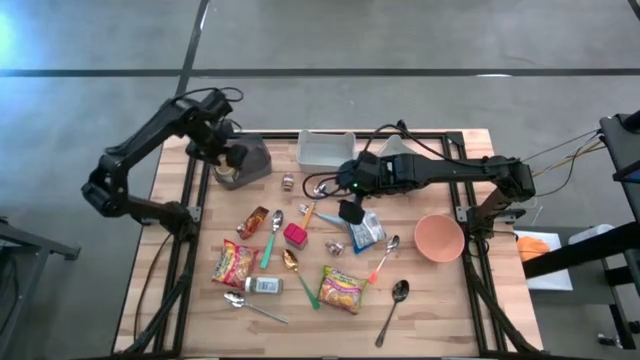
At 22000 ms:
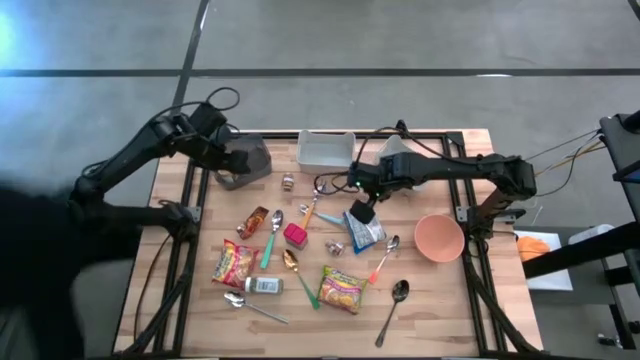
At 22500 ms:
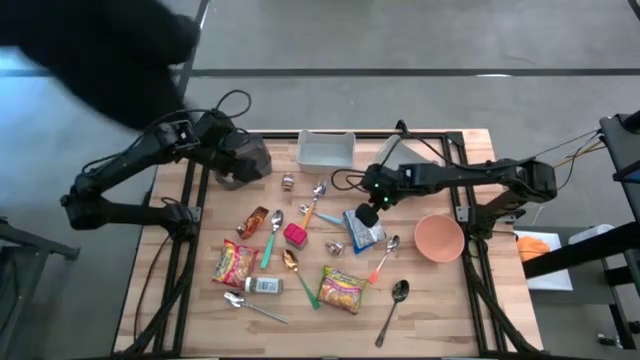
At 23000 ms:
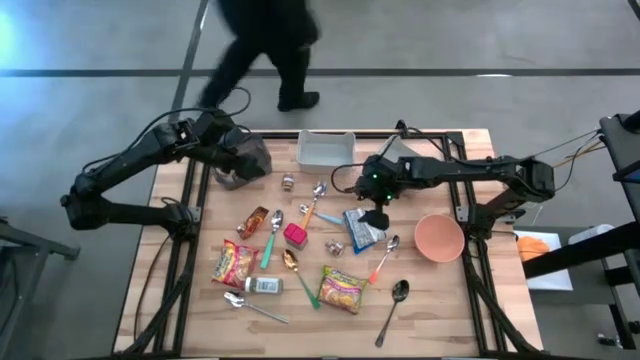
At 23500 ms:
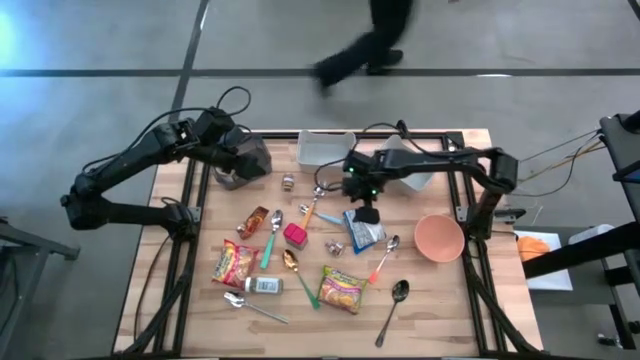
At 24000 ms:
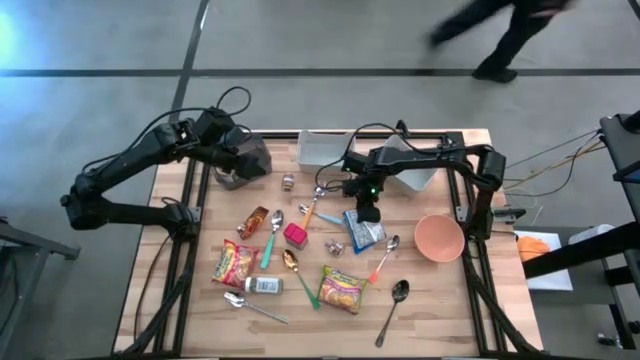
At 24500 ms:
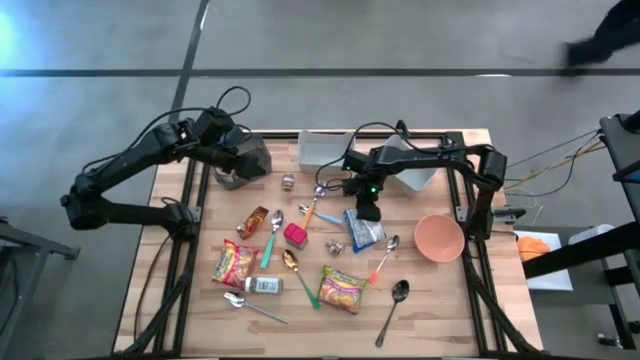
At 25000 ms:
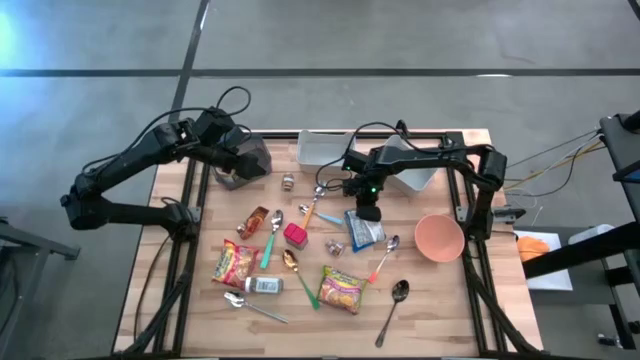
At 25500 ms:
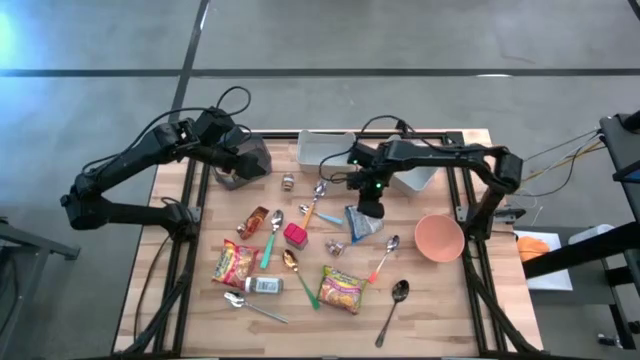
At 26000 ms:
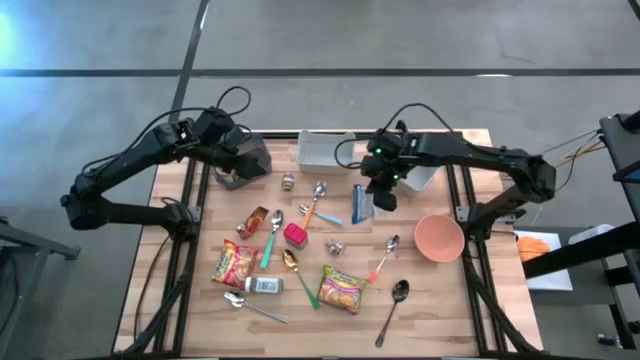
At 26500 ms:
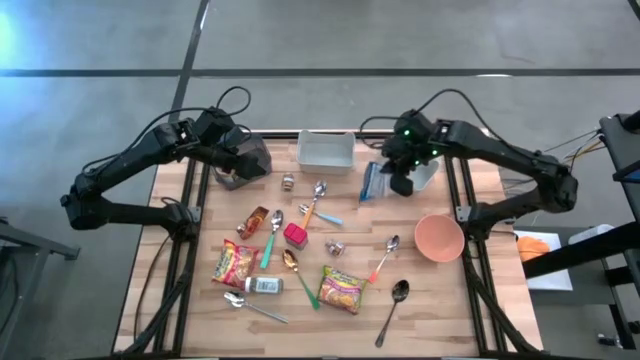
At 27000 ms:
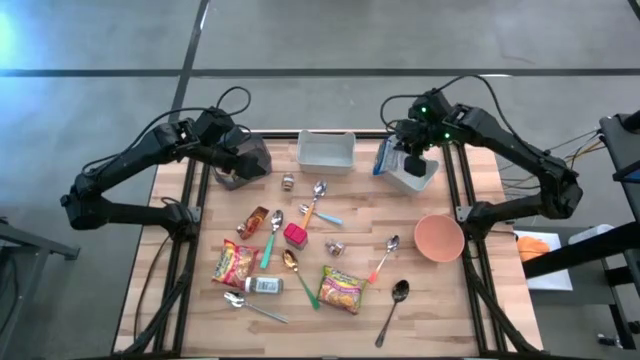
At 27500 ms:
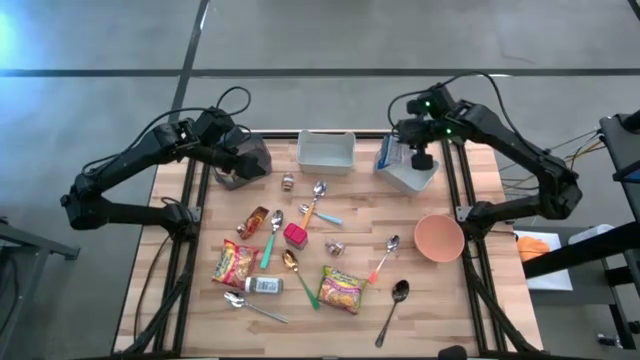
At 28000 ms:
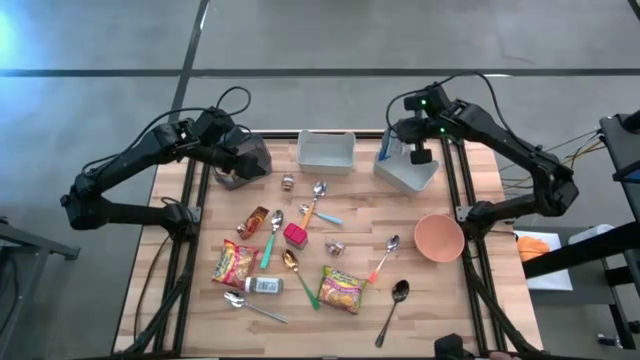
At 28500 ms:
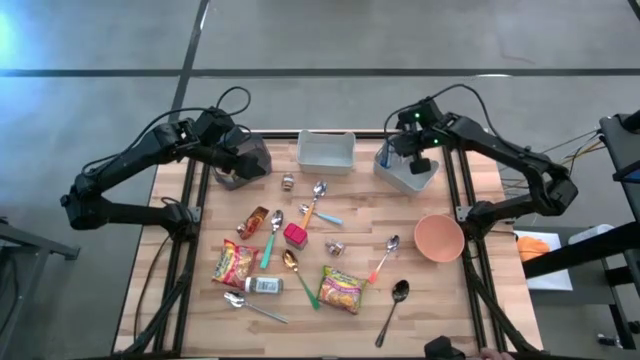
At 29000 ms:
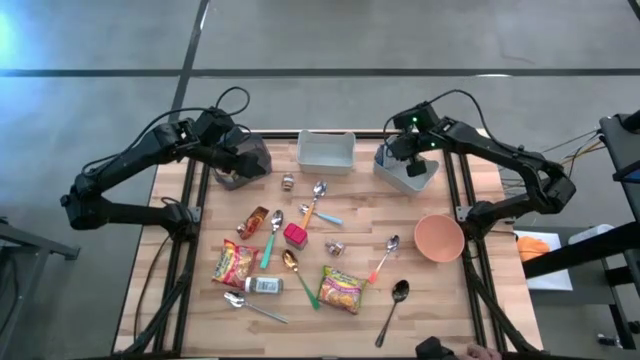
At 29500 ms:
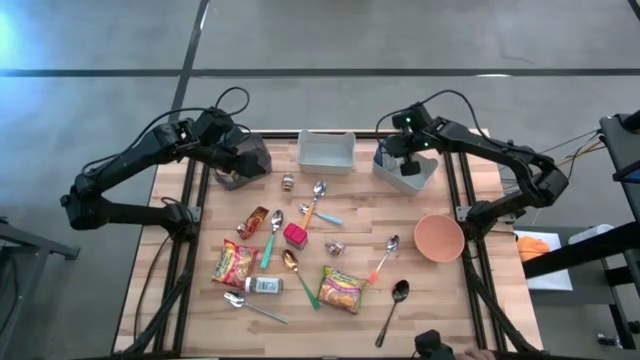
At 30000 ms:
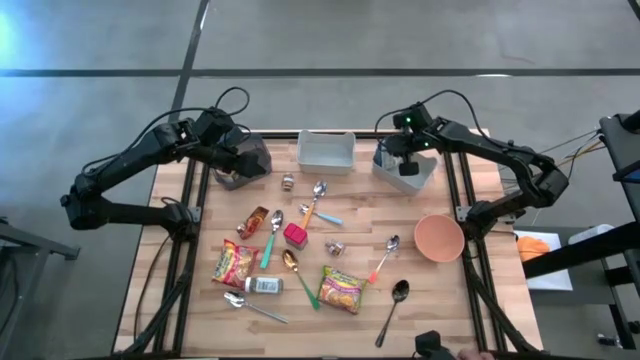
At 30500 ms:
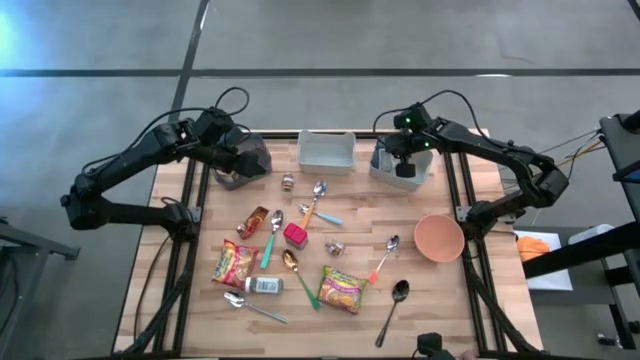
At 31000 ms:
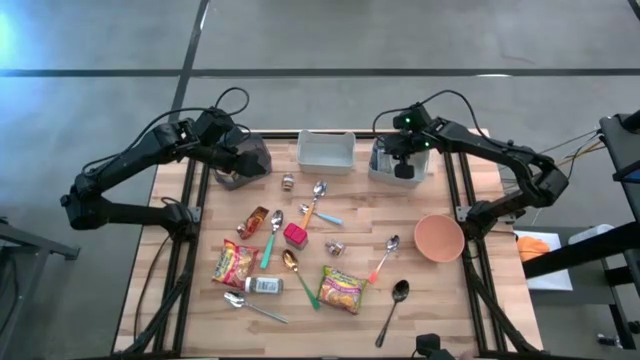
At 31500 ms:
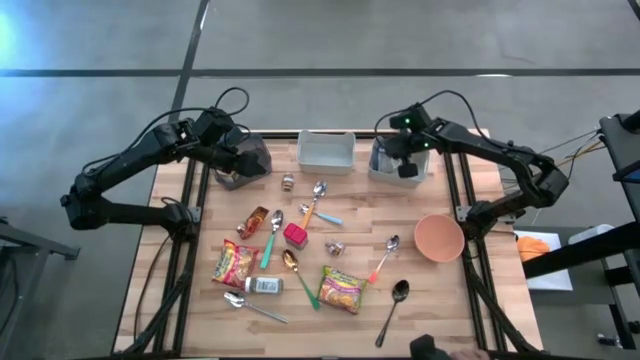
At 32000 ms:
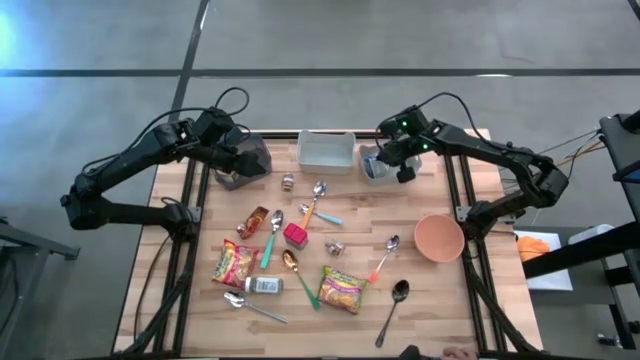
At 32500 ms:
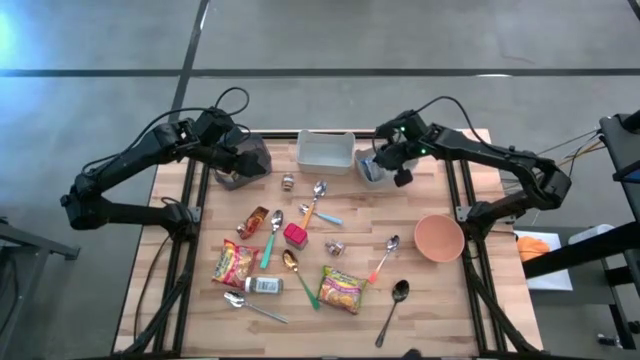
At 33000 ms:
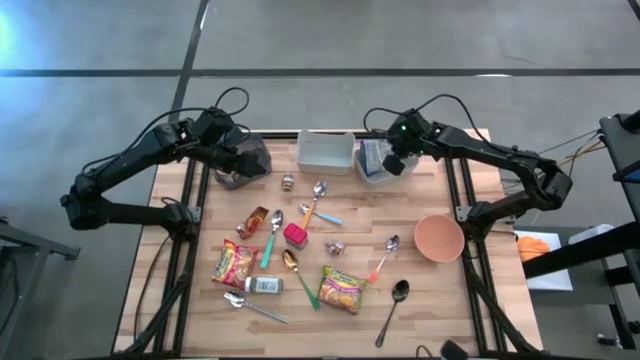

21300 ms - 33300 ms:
Put the blue noodle pack into the right gray bin

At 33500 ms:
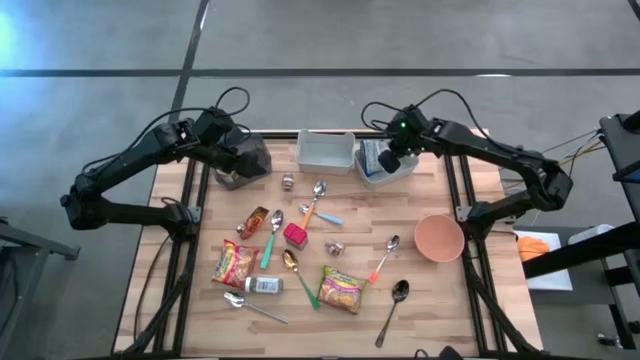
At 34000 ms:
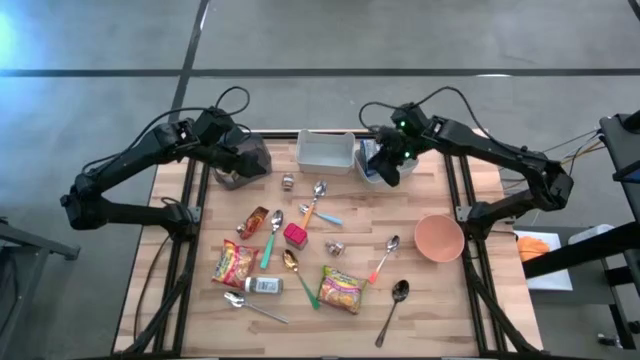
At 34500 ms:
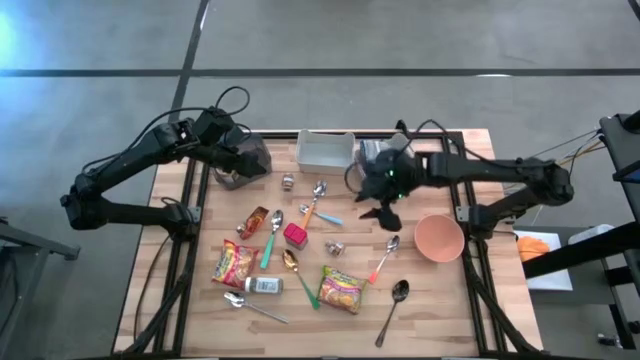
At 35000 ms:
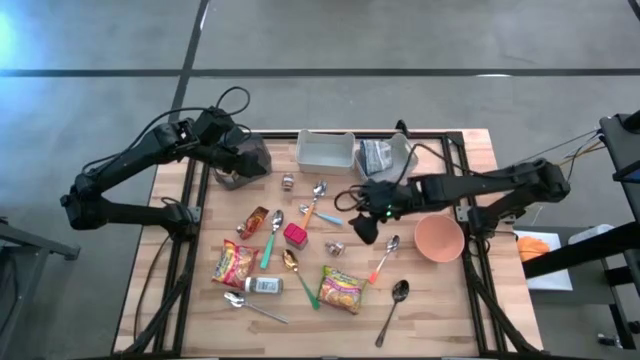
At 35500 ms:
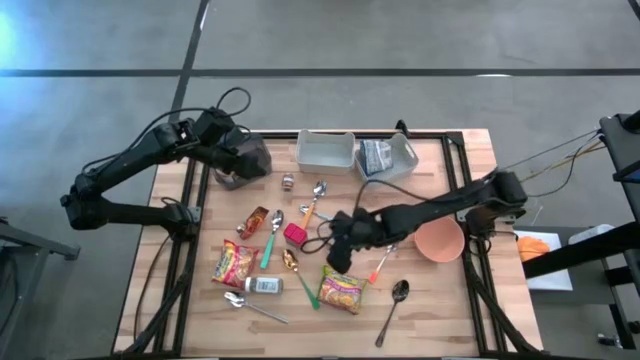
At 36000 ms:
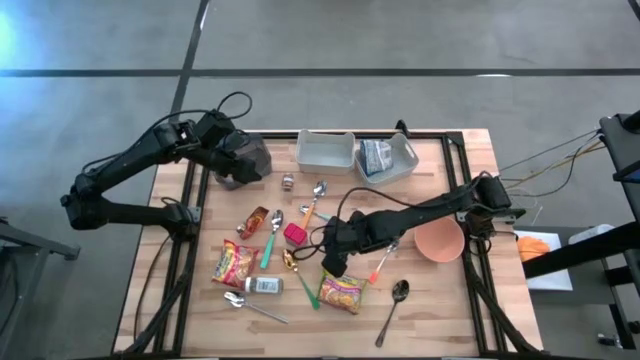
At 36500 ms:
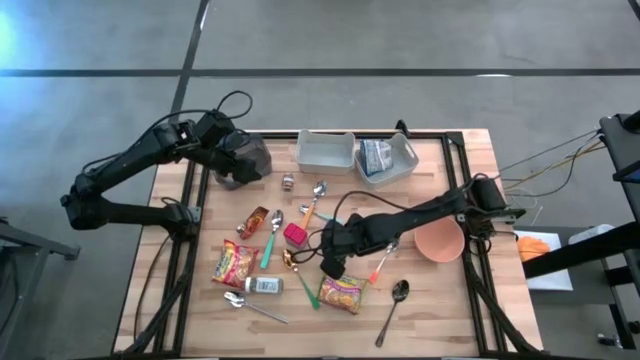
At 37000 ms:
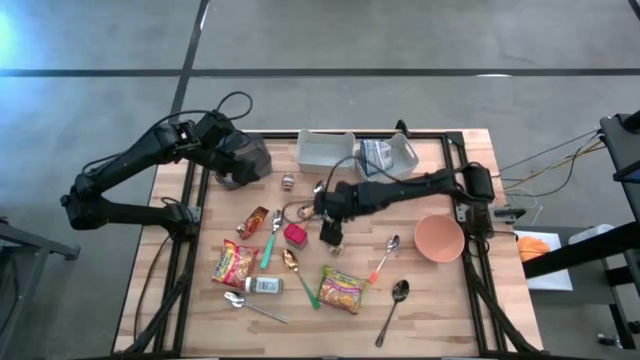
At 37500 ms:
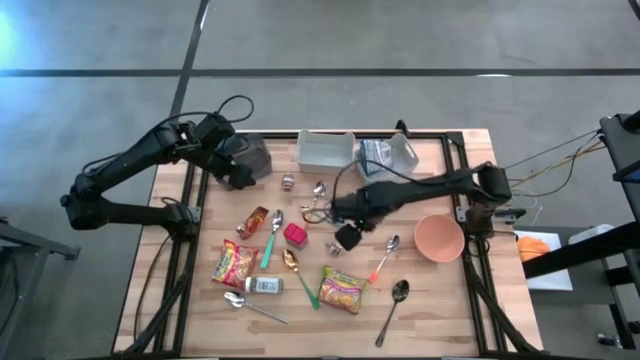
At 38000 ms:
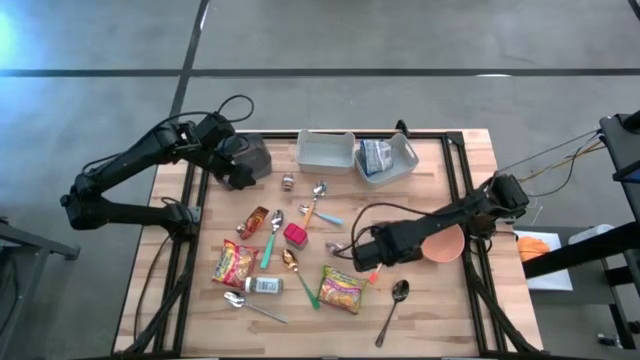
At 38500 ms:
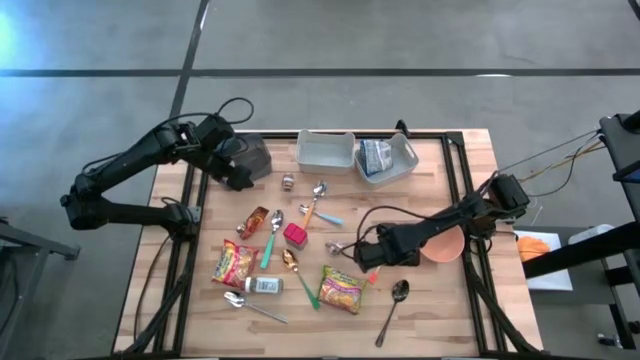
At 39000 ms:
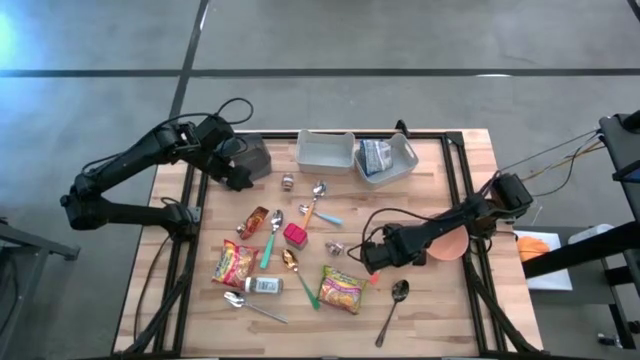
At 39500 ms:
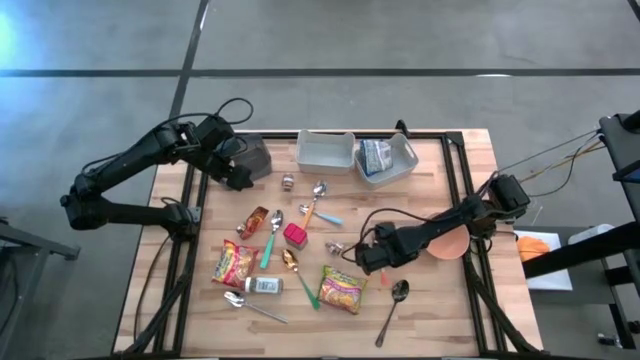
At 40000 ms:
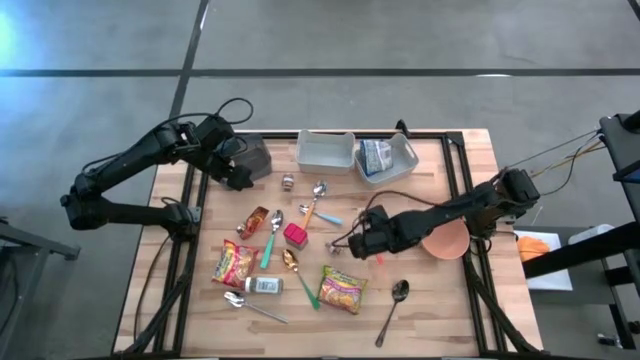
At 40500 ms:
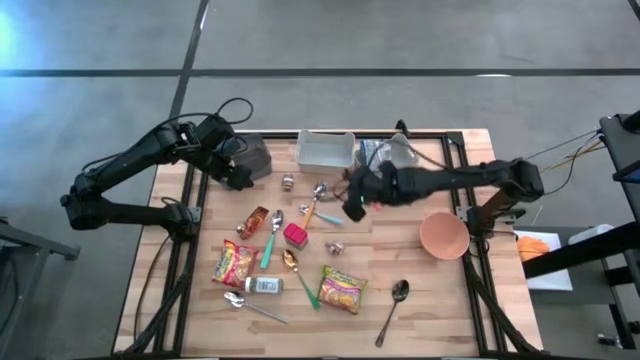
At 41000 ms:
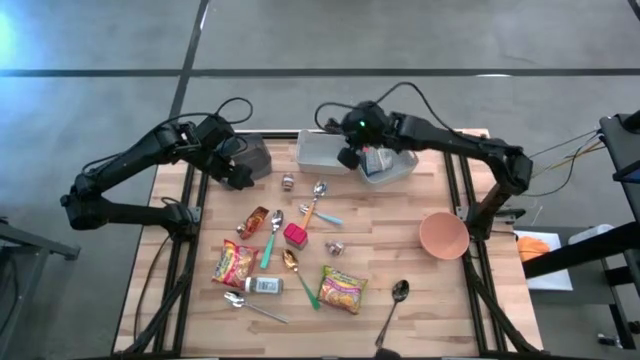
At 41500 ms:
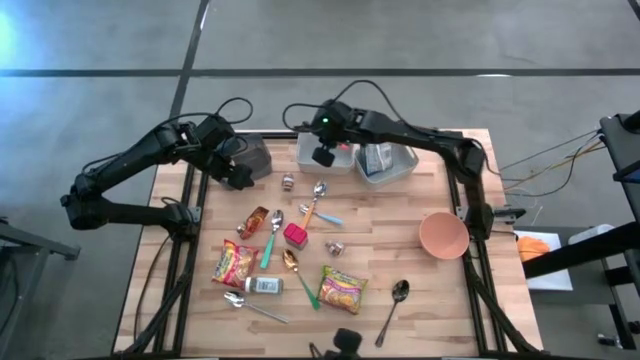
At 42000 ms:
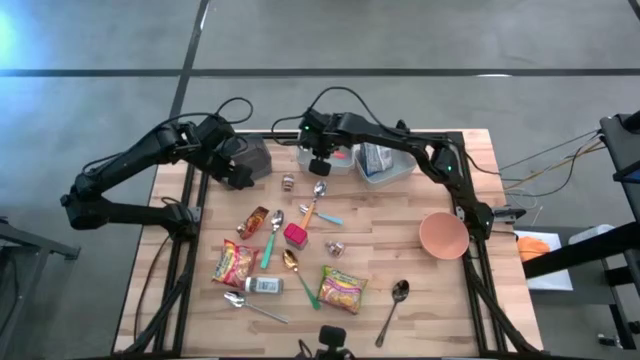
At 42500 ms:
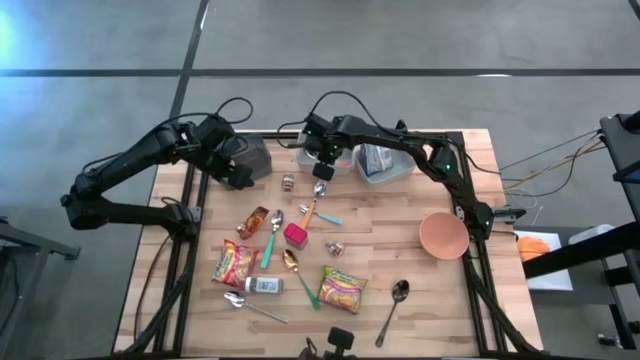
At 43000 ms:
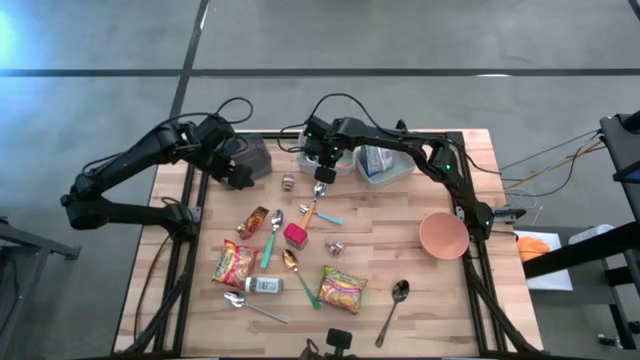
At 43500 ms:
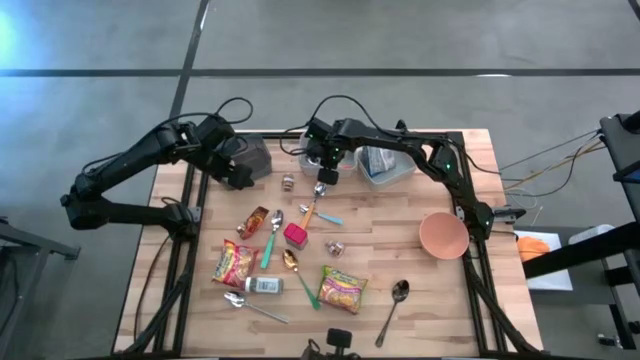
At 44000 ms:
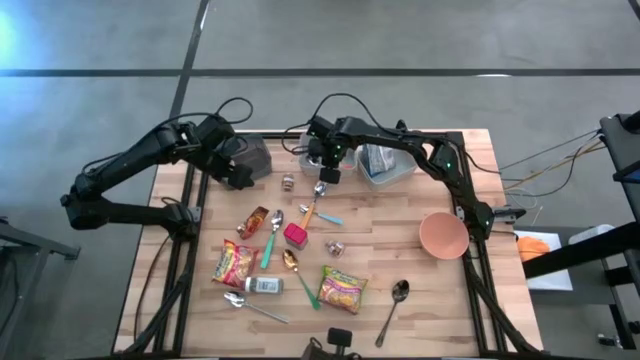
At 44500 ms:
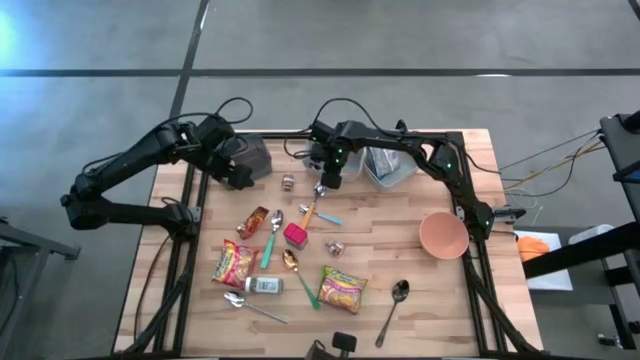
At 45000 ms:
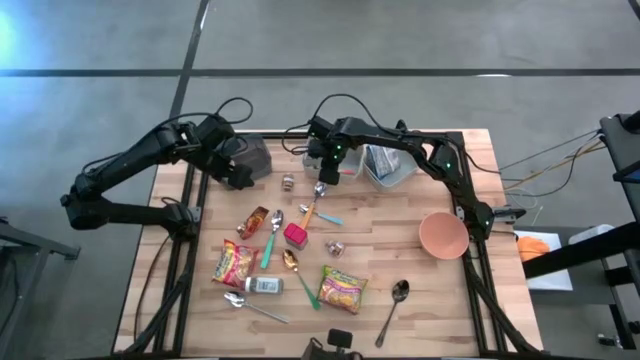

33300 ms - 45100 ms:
Put the white and orange spoon into the left gray bin
